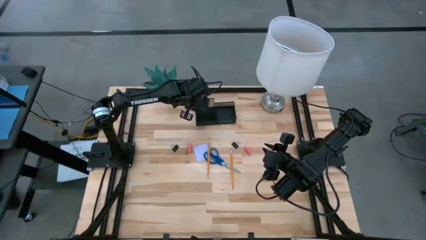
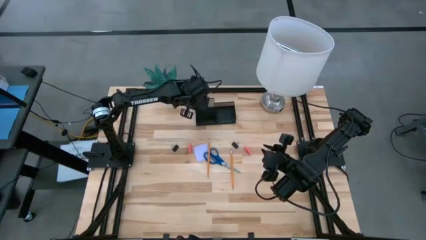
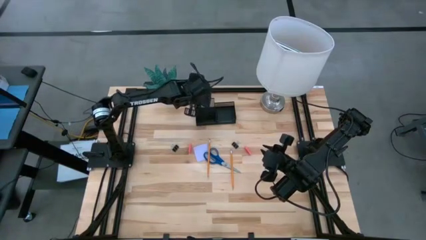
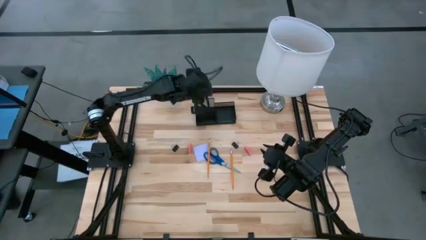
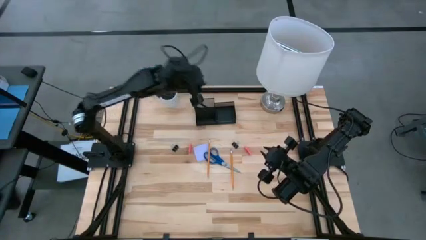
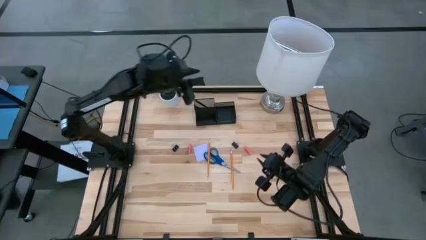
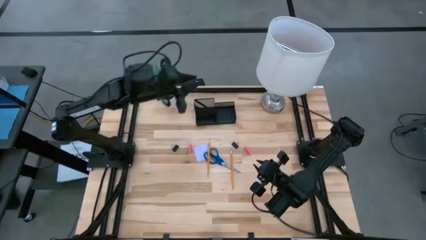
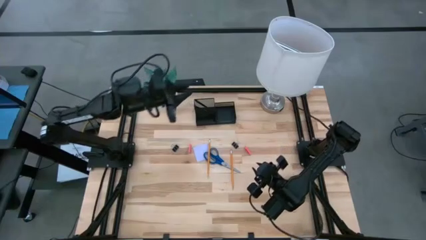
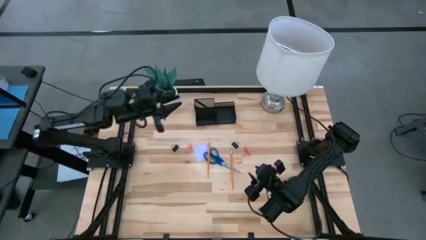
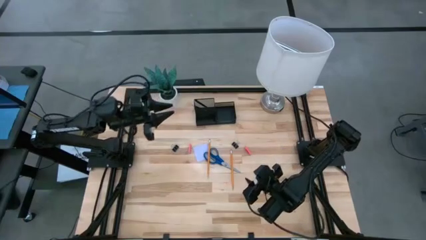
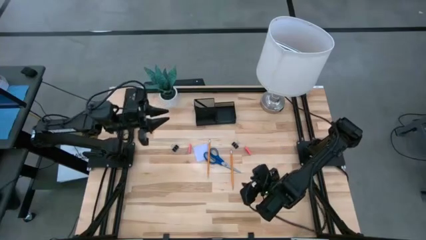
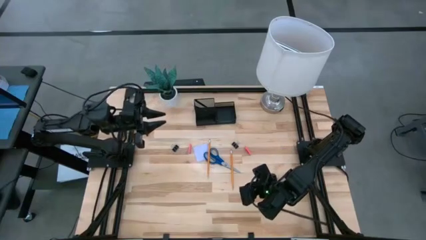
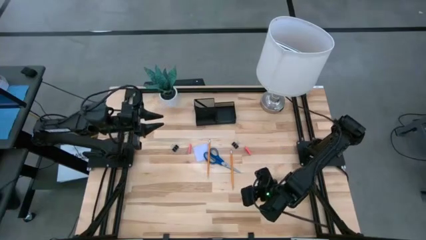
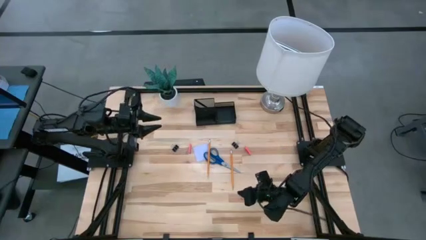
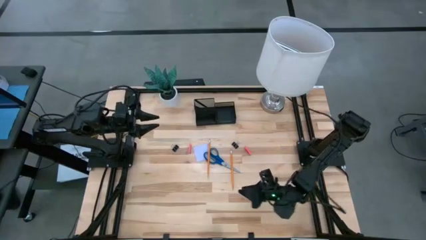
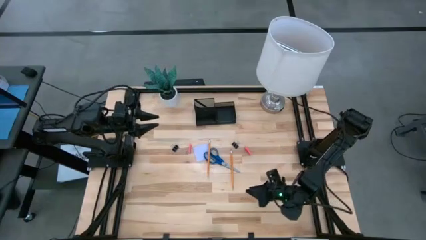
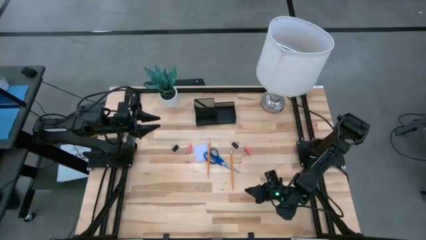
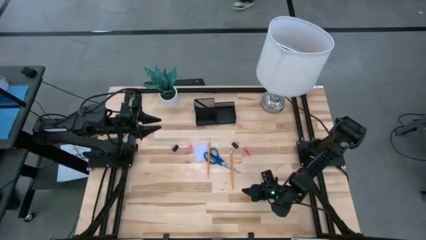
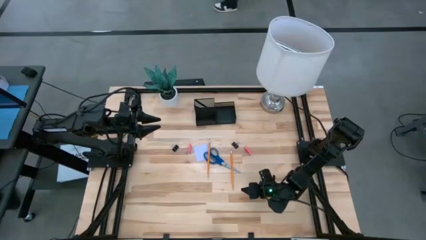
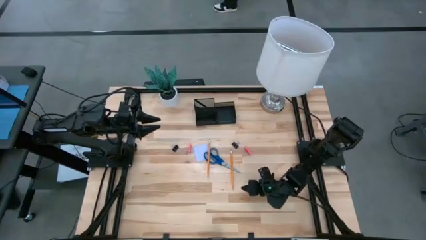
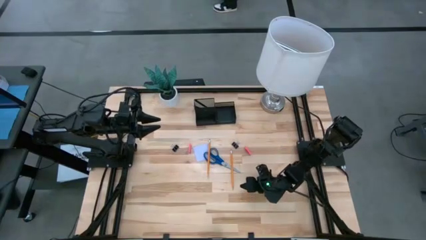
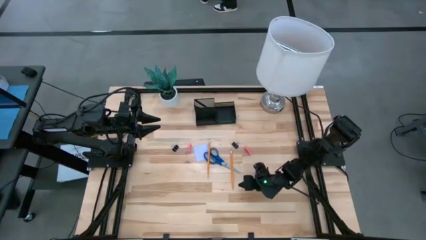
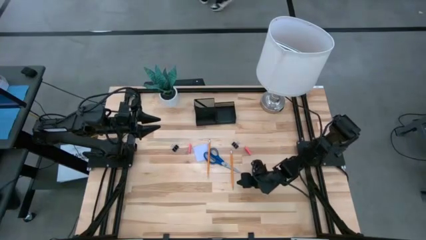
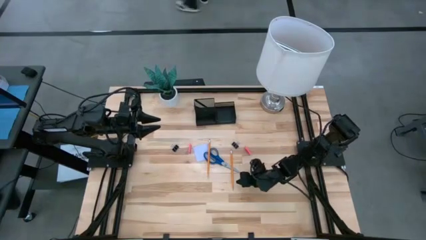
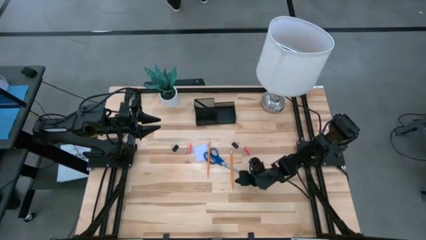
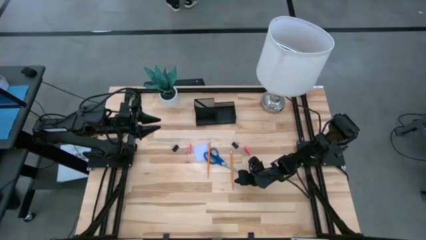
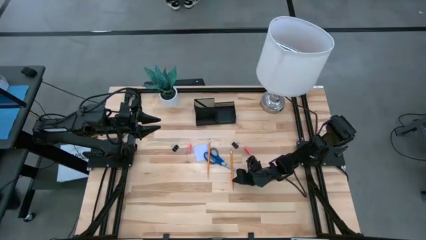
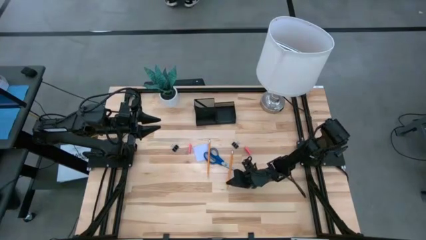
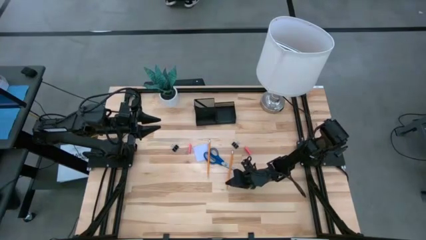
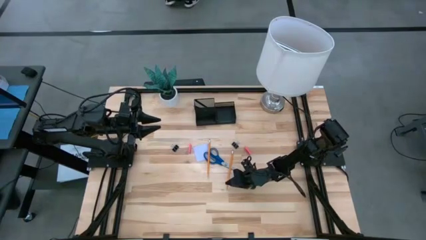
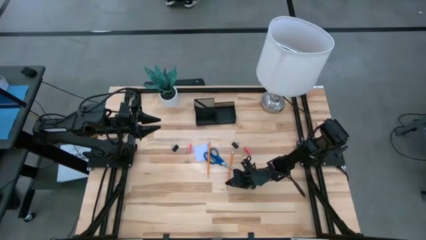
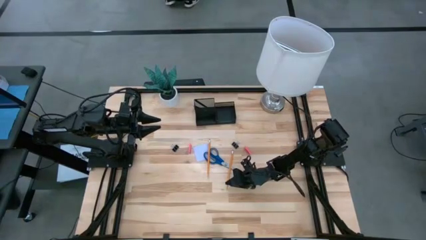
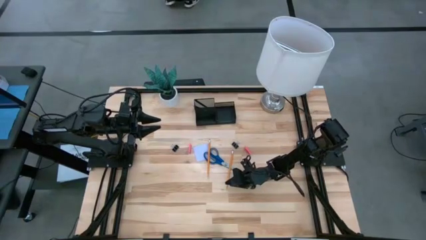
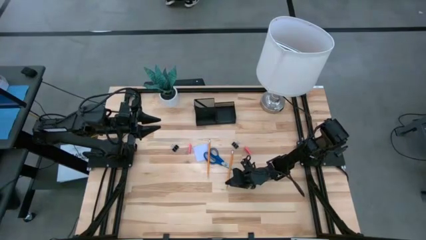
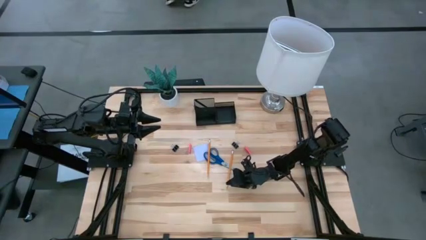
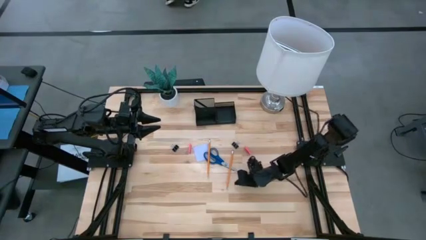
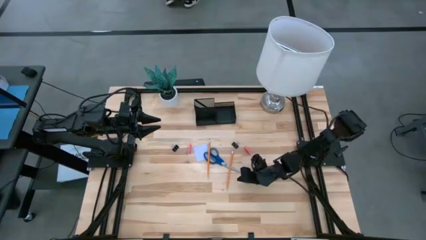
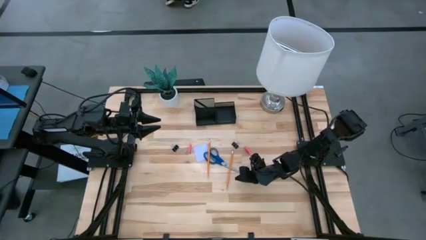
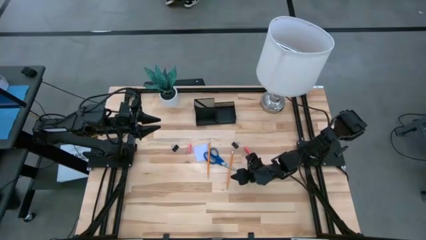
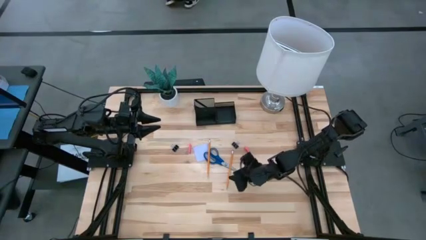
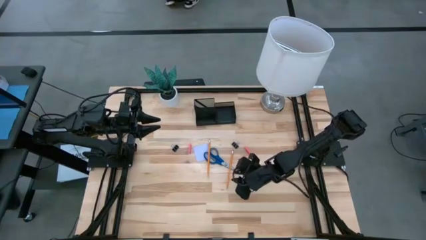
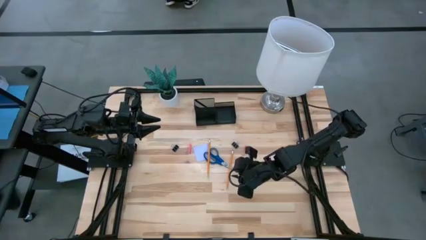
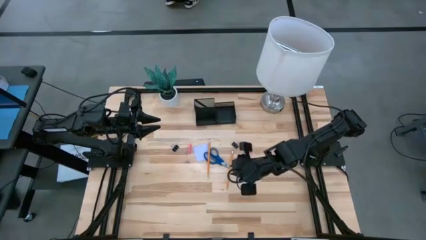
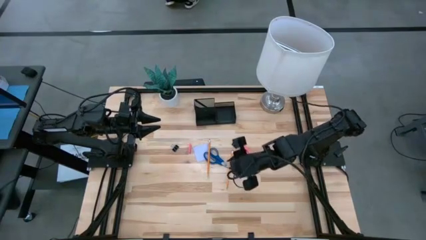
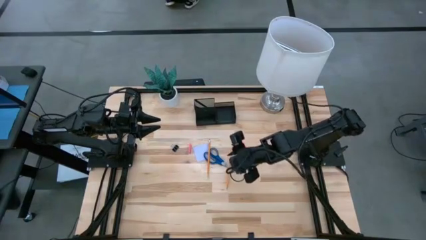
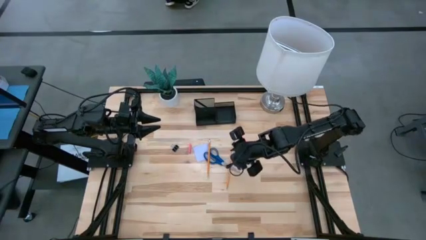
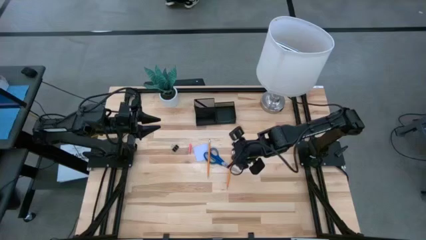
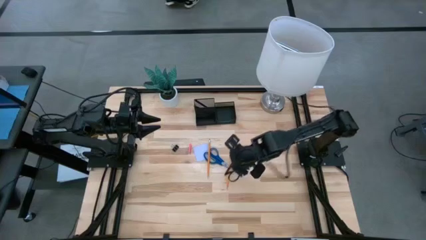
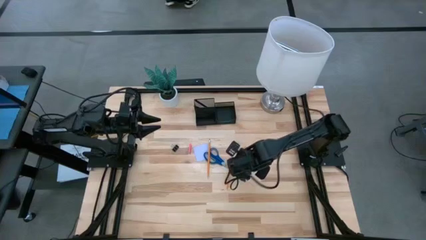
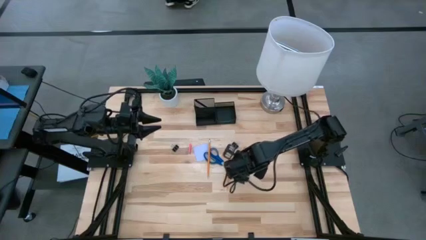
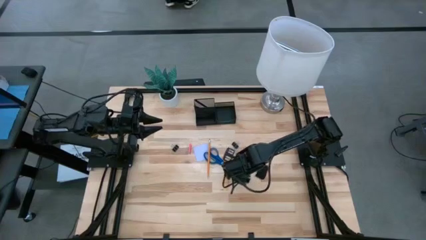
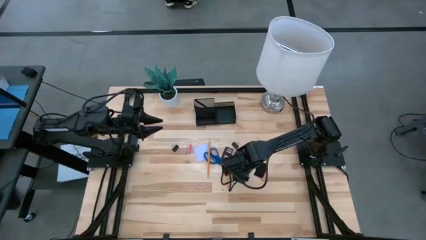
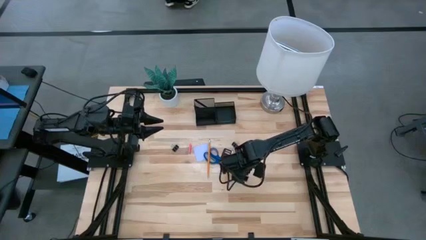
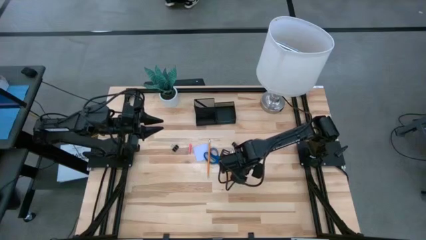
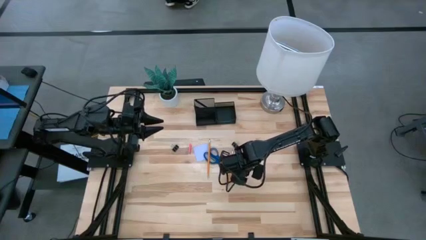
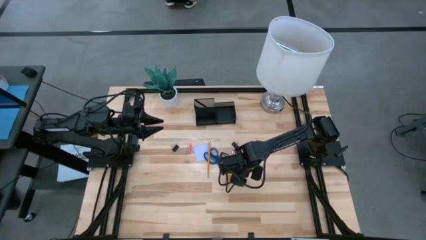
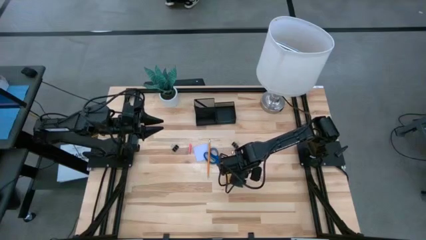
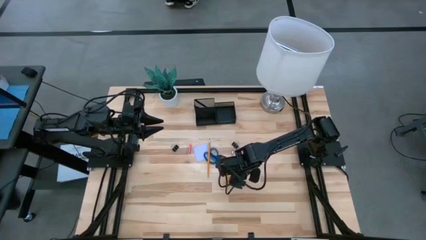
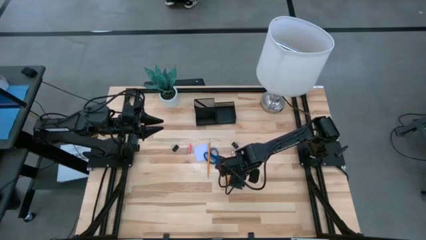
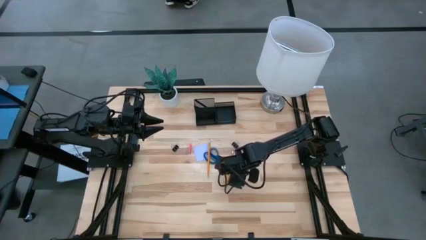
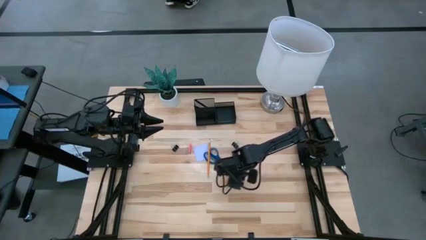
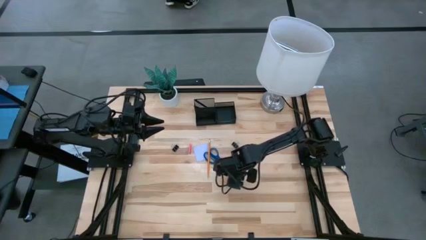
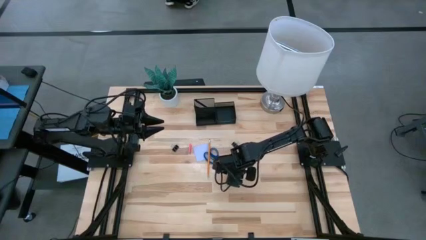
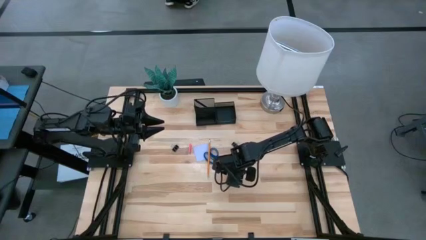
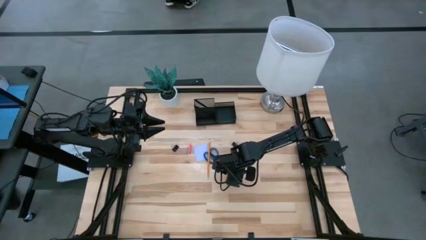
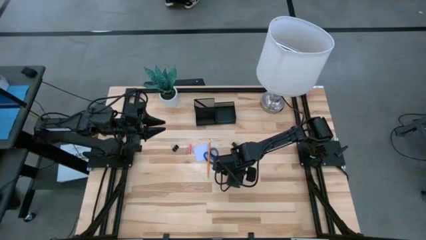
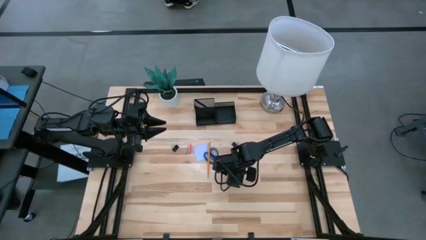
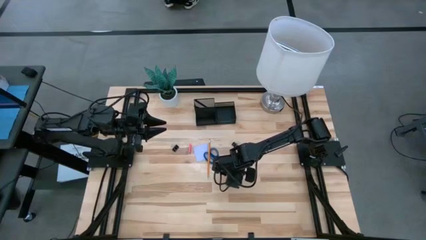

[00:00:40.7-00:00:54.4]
Task: Pick and place office supplies into organizer
Put the right pencil into the desk organizer
